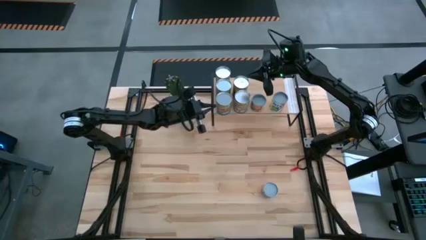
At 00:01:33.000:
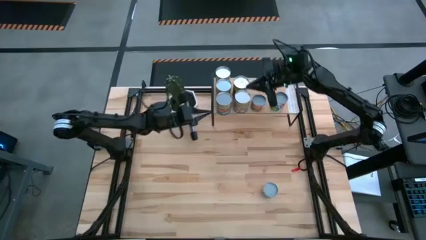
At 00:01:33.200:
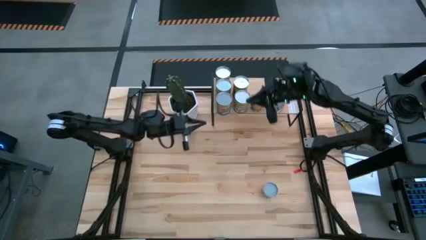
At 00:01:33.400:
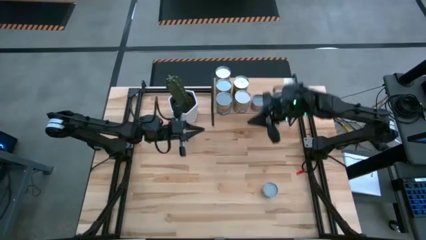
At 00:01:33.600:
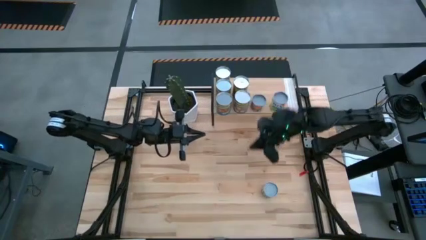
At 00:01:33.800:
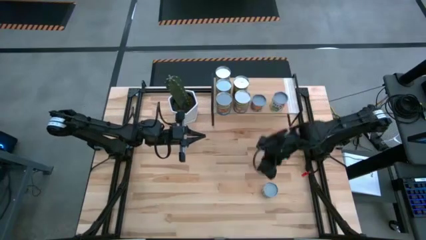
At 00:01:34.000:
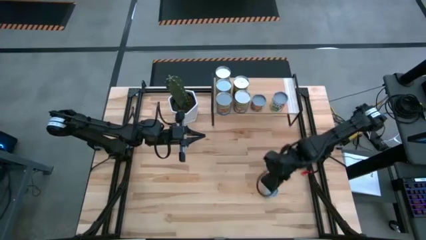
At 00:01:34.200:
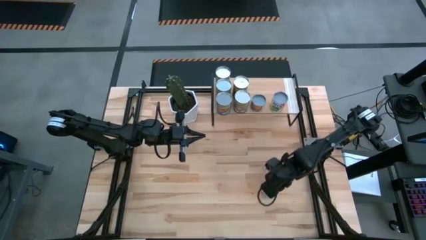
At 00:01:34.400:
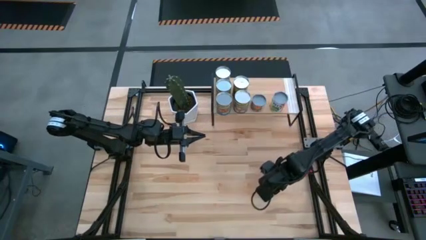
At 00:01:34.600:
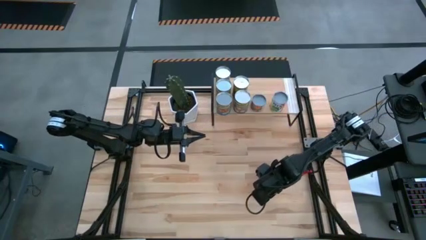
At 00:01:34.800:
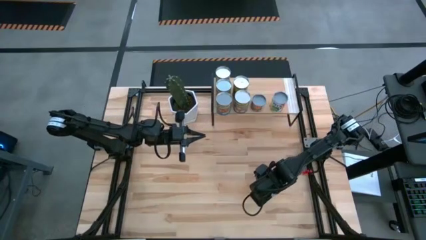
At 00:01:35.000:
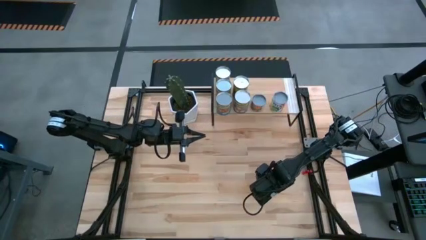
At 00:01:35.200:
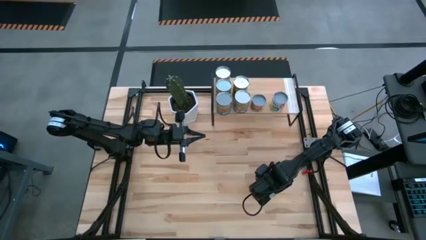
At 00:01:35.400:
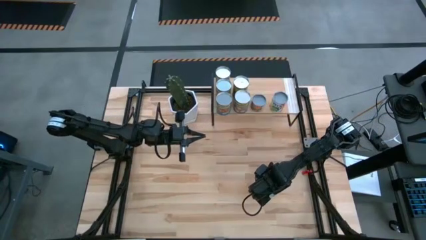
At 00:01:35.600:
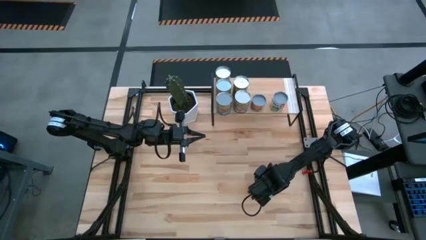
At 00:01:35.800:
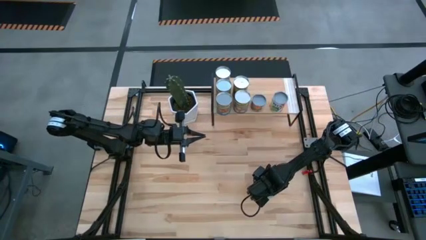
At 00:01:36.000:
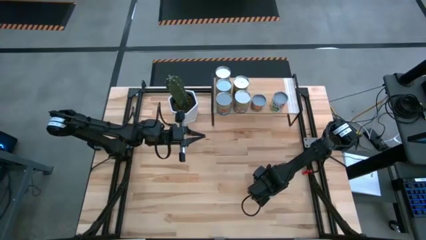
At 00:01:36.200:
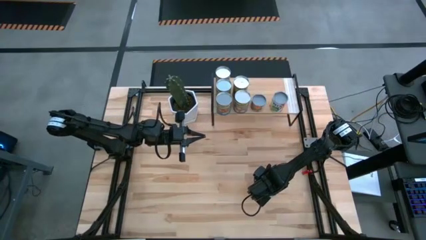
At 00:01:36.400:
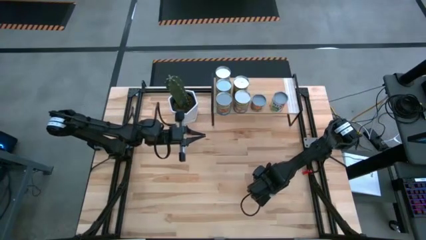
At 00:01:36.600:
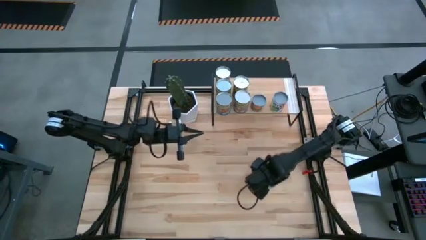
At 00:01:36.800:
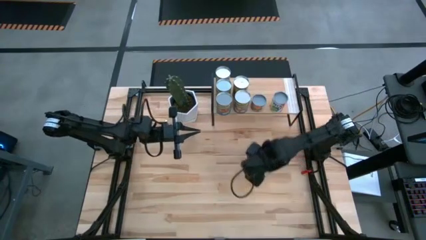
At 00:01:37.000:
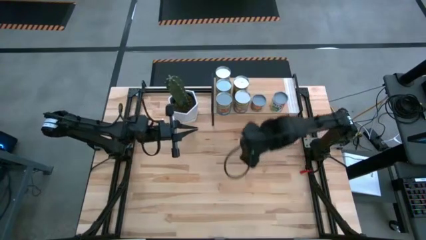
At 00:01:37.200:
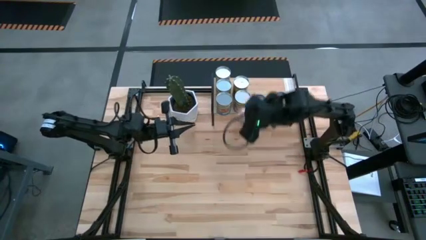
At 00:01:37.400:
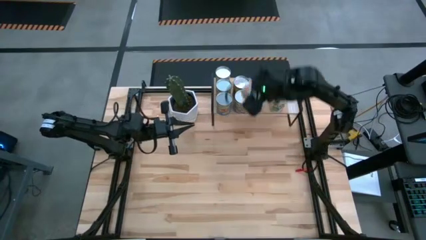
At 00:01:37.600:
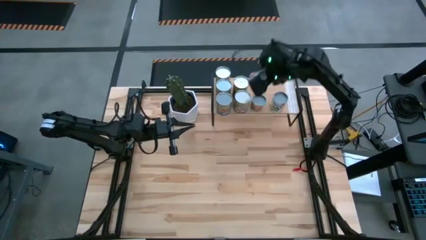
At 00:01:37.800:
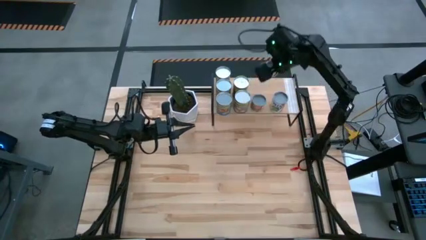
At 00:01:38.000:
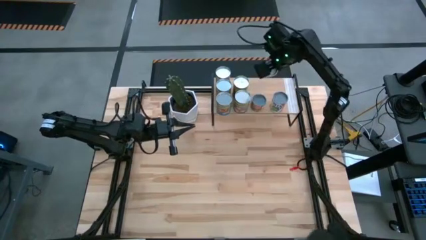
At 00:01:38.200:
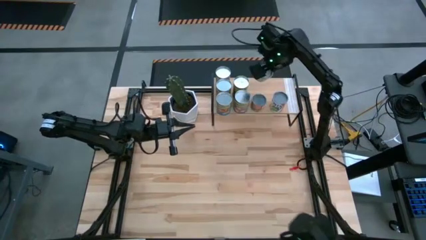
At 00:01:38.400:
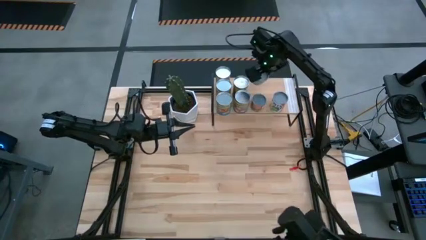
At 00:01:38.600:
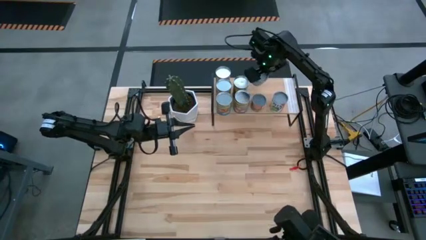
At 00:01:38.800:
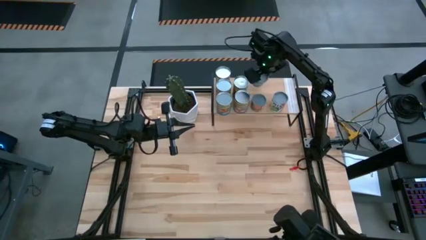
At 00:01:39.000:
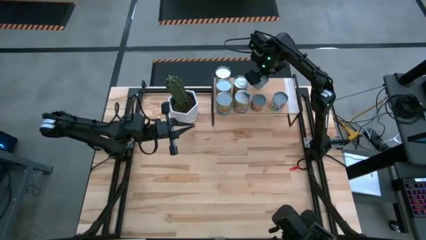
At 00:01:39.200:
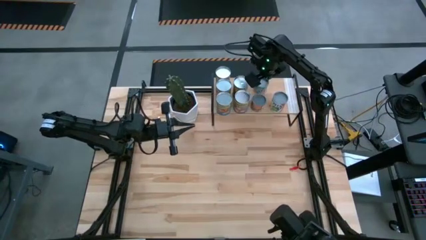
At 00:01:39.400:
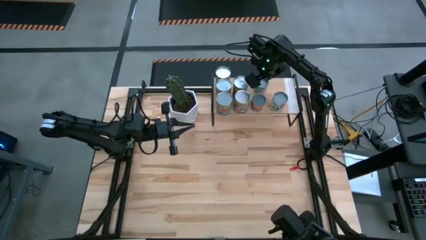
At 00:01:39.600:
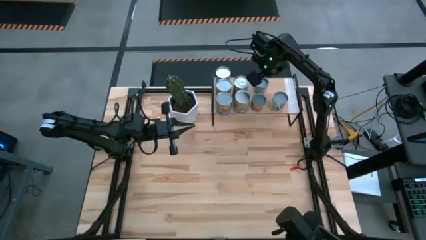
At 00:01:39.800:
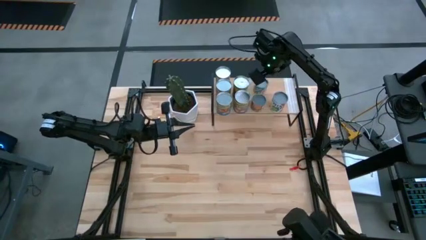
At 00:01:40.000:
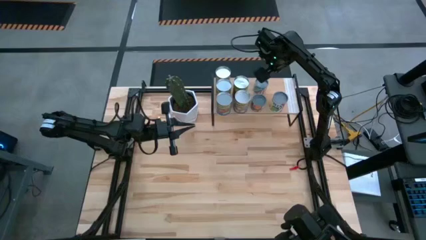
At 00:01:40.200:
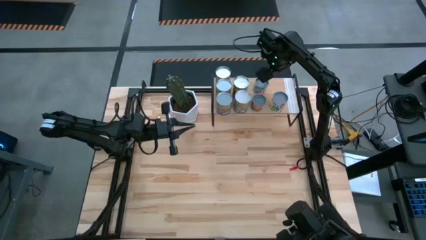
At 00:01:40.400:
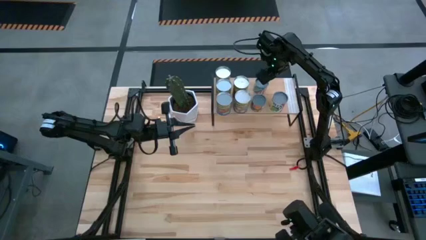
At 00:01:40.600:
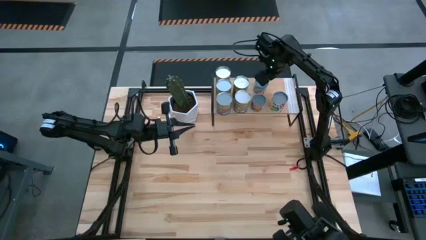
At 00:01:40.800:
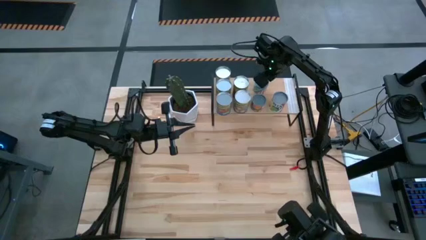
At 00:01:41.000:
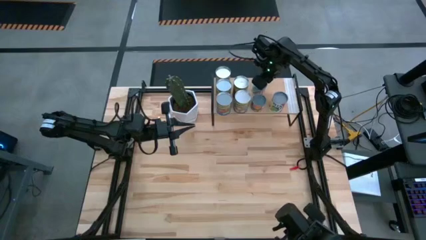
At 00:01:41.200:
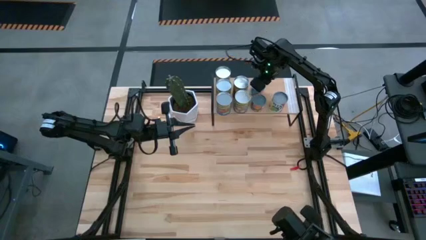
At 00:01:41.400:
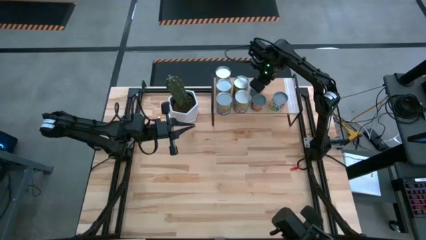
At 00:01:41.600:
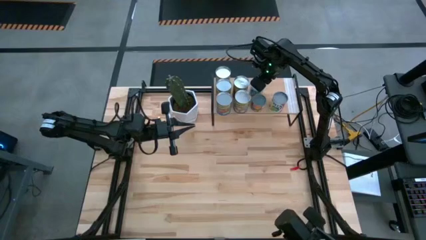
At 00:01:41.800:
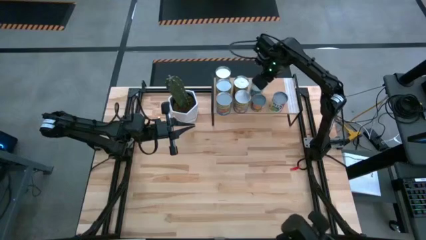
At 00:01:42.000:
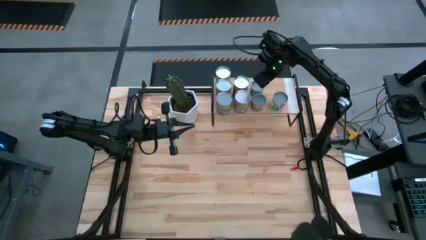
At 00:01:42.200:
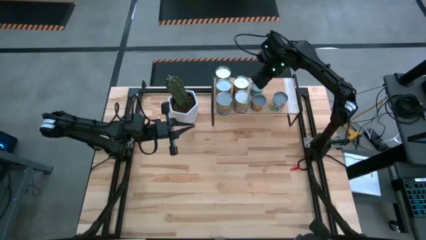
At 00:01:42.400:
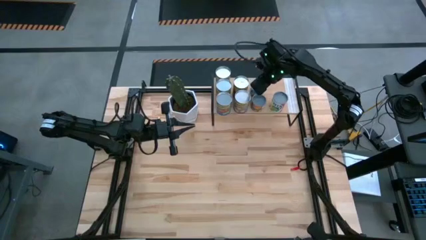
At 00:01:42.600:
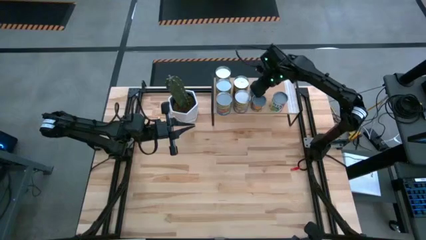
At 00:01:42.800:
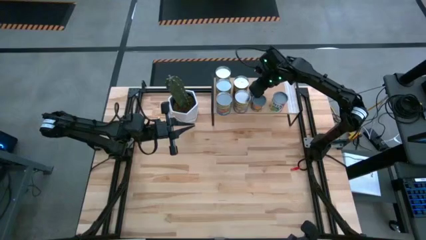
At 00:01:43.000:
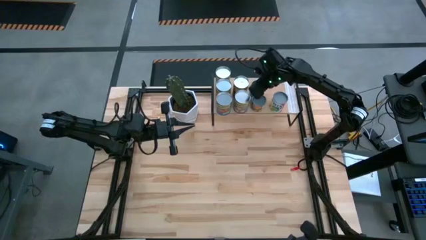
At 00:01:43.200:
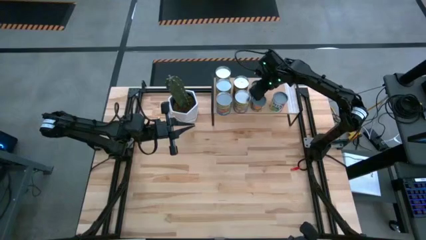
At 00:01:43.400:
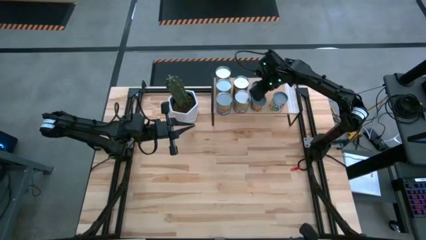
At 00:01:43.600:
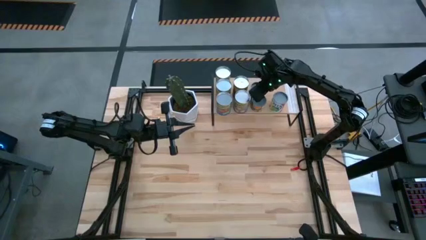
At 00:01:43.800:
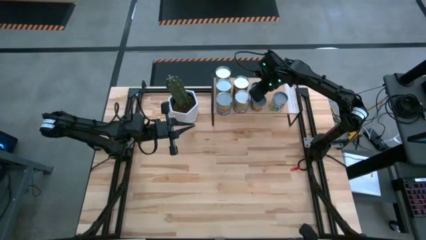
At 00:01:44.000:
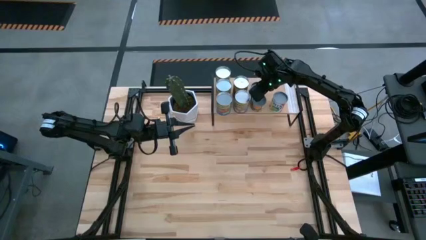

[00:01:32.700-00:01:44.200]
Task: Pick and place cans onto a shelf
Put the canned sliced carrots on the shelf

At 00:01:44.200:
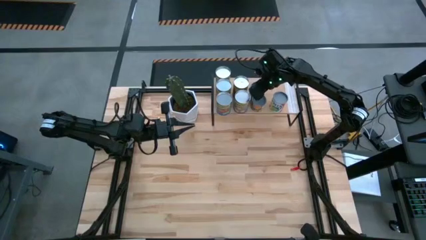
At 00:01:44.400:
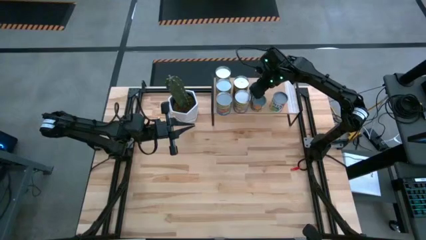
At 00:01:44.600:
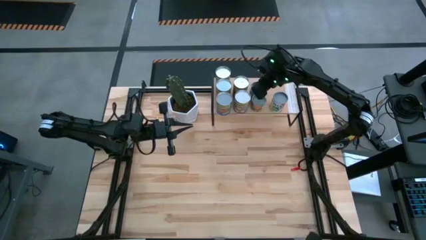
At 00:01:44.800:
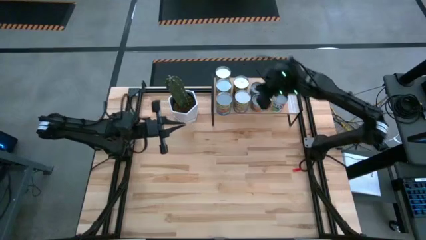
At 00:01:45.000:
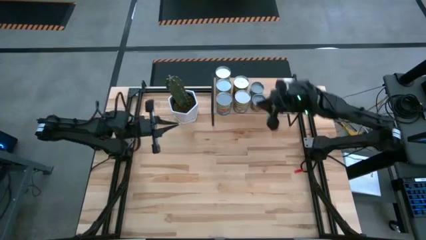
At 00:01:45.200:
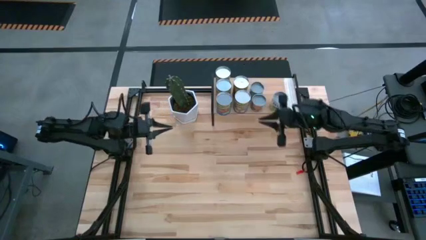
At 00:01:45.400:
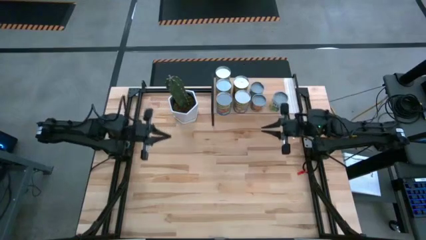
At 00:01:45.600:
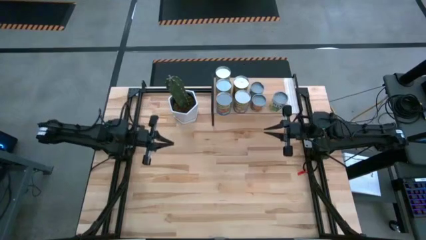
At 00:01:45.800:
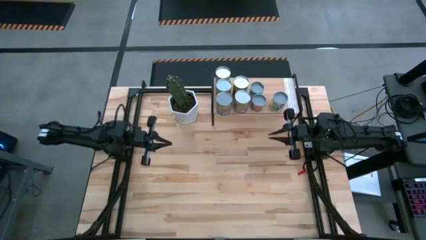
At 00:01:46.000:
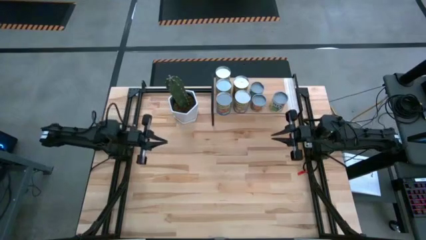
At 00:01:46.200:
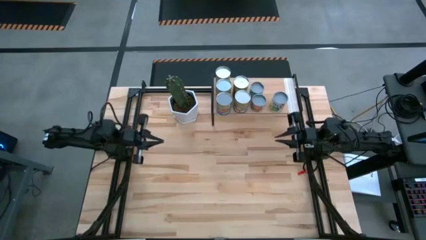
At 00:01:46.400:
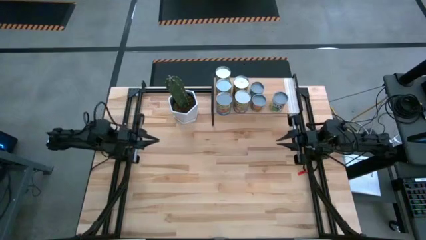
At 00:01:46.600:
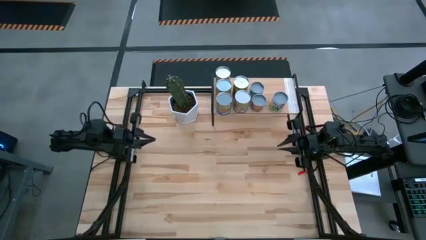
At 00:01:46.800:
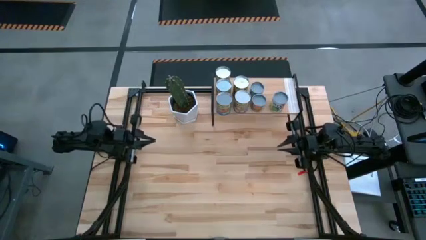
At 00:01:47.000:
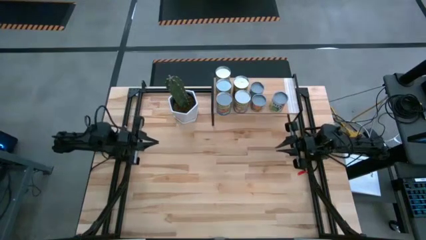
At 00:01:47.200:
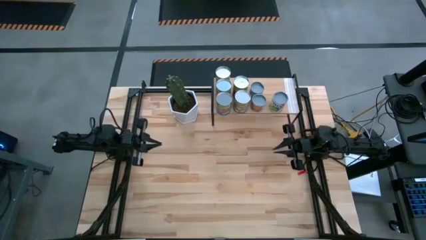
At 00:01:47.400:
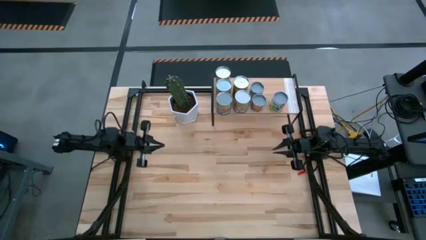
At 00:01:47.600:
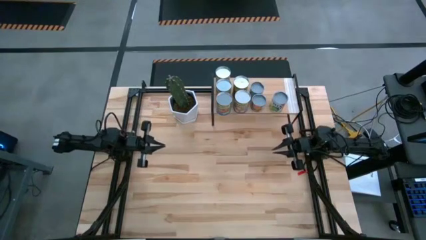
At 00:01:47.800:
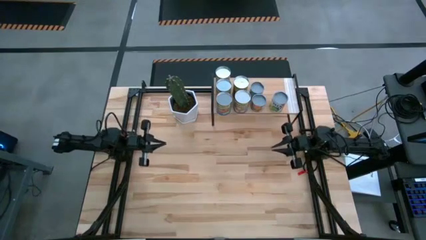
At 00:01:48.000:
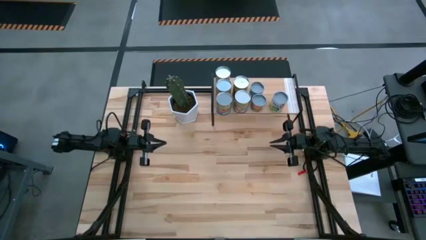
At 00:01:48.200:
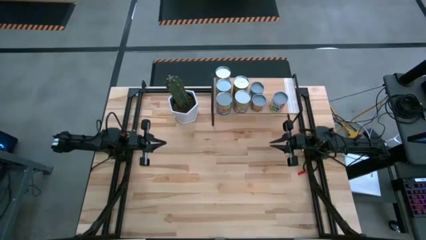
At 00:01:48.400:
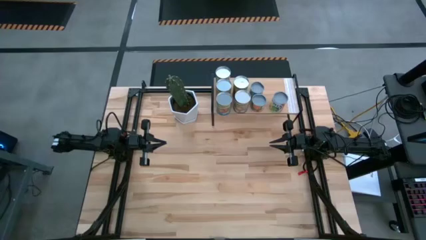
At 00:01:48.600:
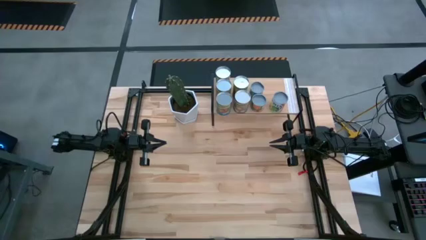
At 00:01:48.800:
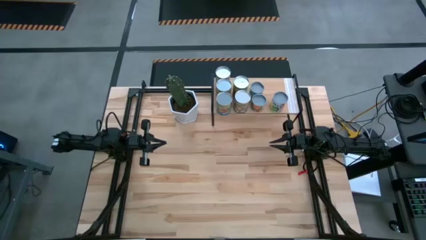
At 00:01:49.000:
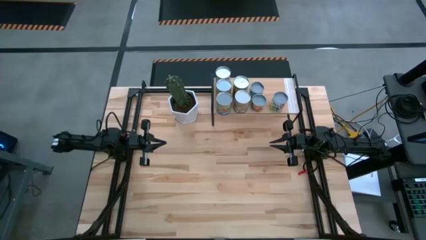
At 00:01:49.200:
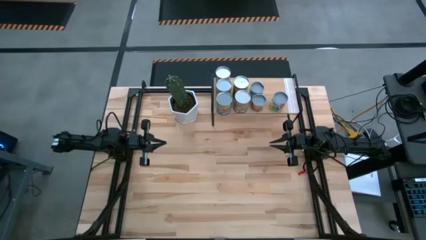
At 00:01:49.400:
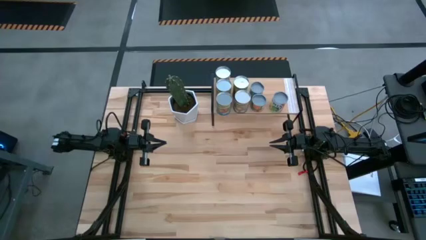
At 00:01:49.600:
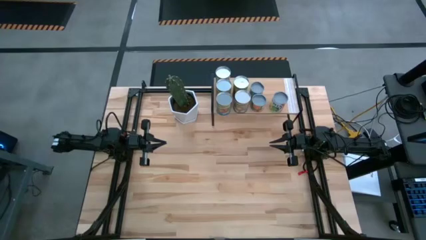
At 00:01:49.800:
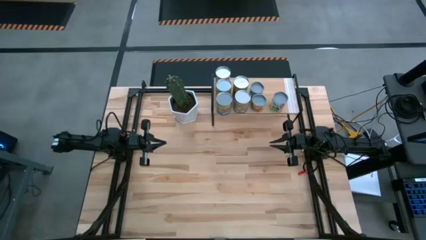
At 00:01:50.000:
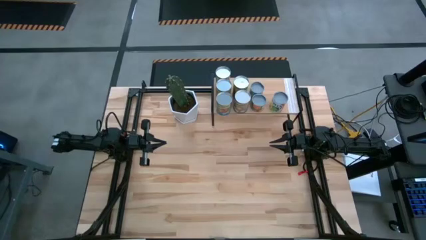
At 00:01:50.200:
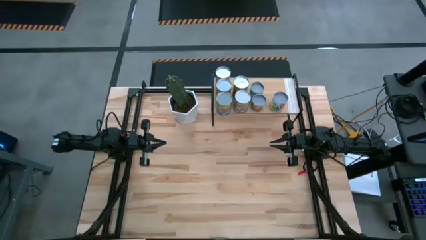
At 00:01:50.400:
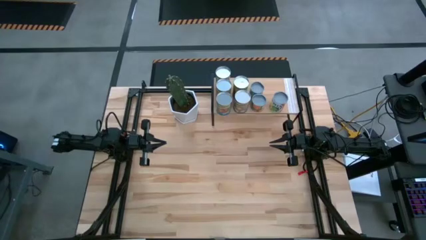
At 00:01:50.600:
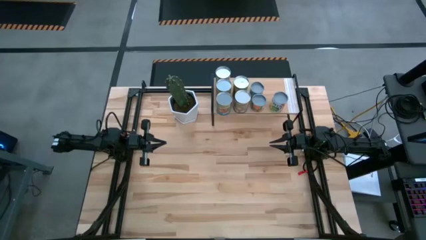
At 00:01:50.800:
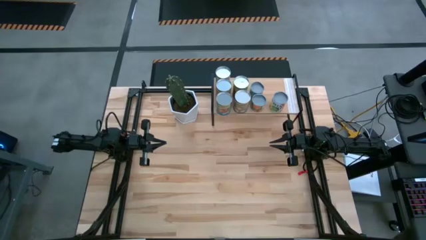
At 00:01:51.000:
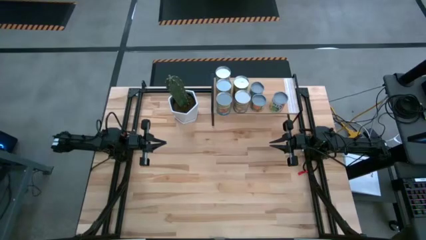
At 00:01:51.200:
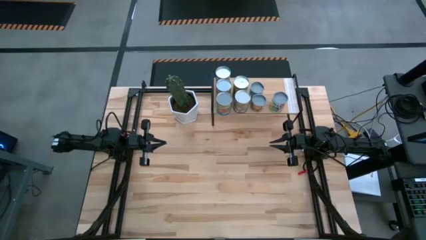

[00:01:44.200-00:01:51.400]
Return to Home Position
